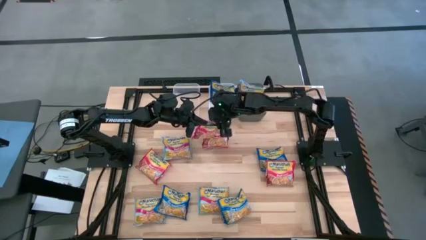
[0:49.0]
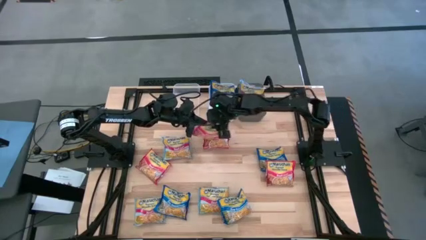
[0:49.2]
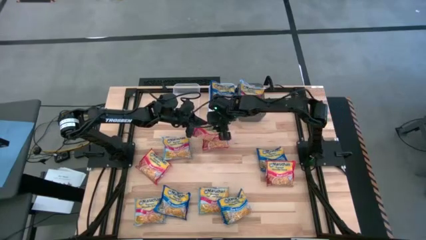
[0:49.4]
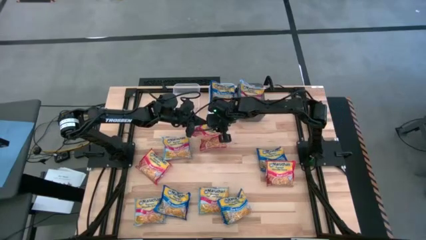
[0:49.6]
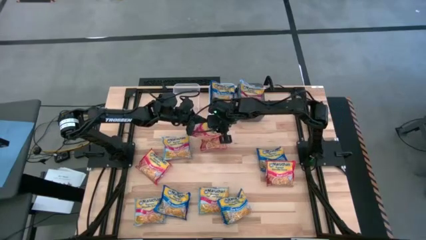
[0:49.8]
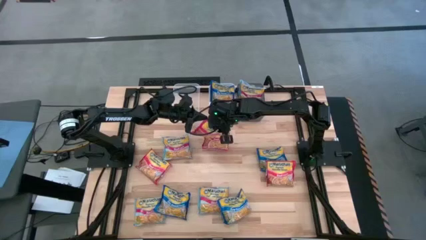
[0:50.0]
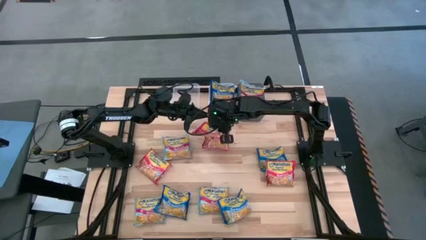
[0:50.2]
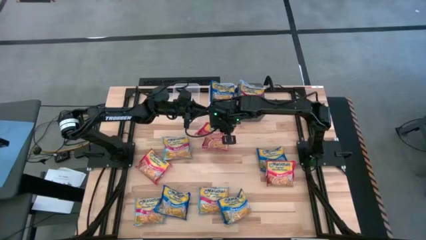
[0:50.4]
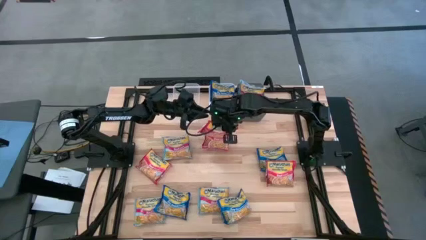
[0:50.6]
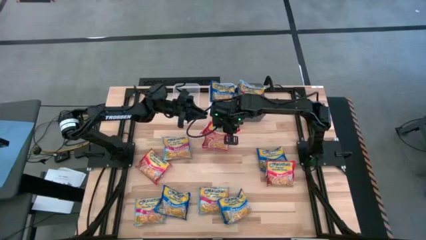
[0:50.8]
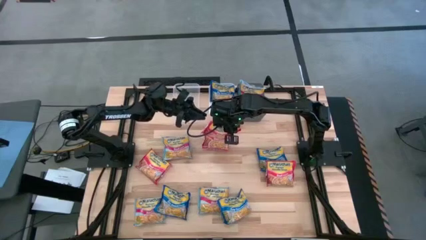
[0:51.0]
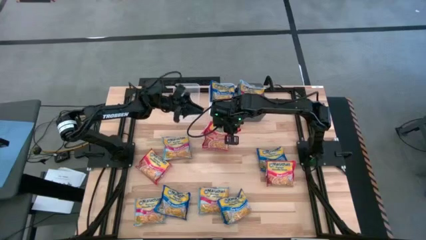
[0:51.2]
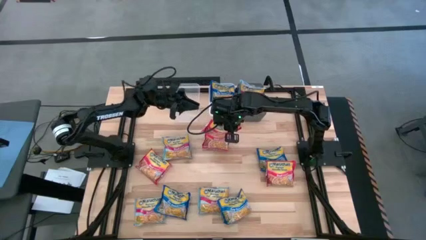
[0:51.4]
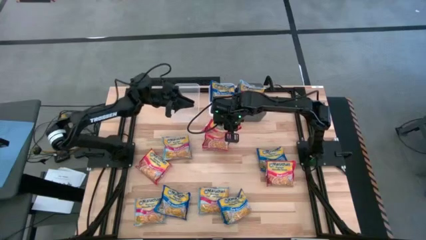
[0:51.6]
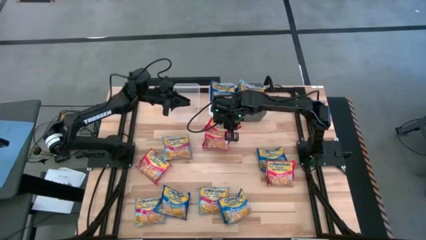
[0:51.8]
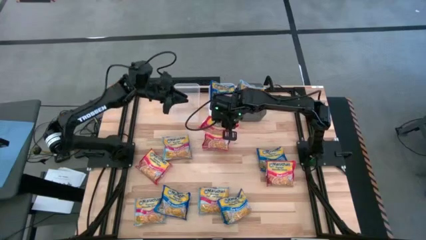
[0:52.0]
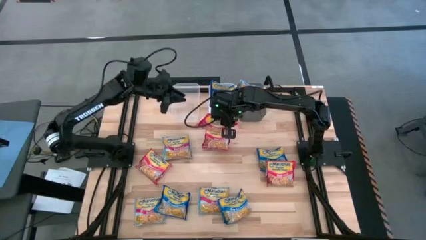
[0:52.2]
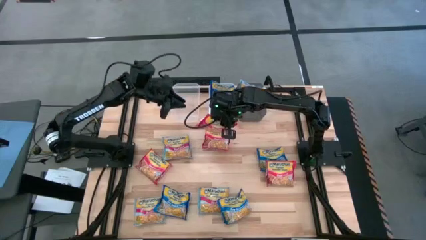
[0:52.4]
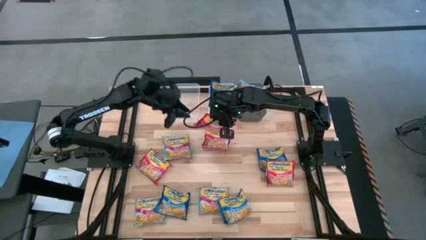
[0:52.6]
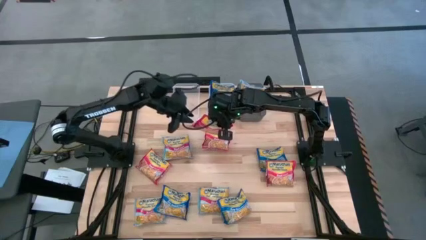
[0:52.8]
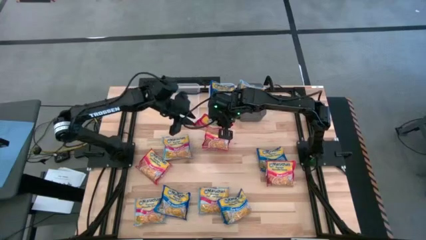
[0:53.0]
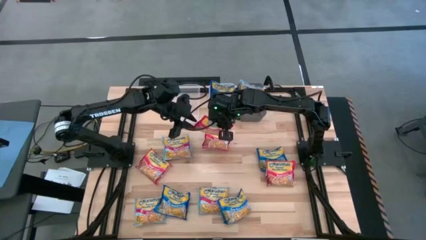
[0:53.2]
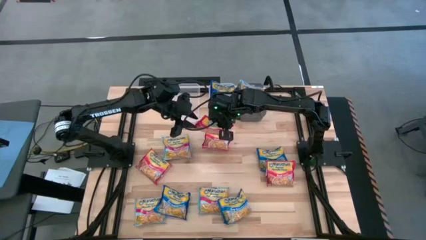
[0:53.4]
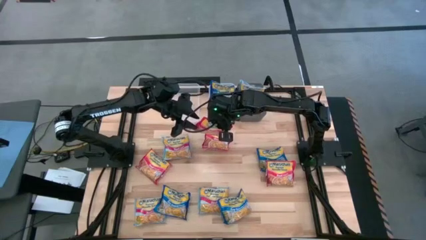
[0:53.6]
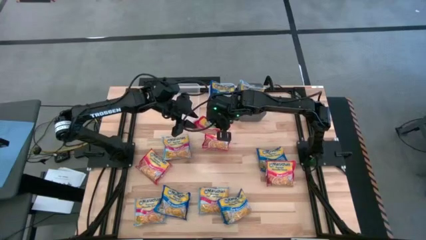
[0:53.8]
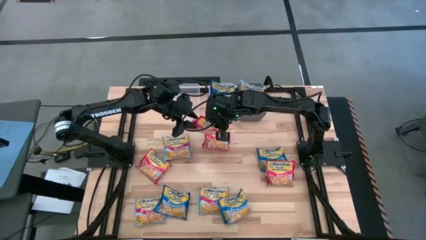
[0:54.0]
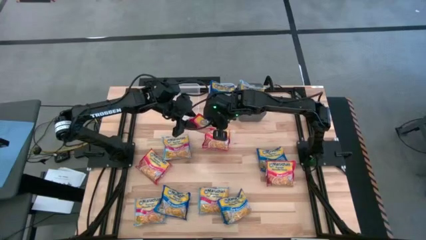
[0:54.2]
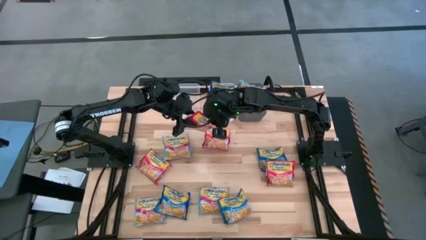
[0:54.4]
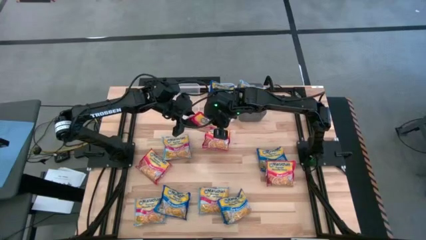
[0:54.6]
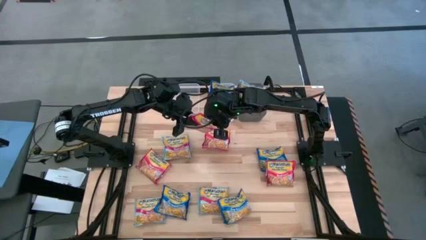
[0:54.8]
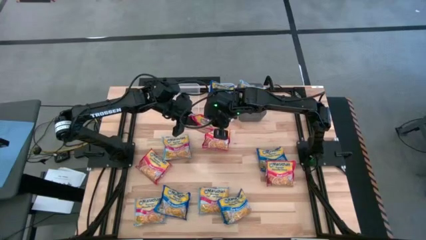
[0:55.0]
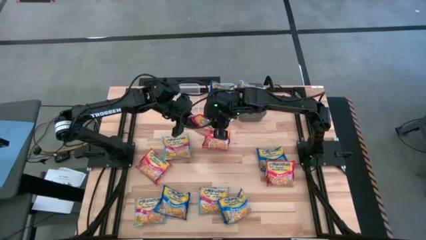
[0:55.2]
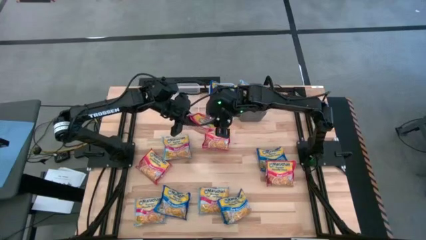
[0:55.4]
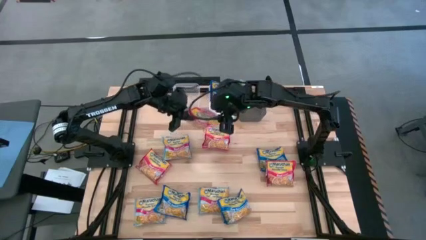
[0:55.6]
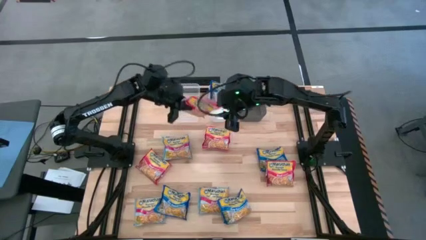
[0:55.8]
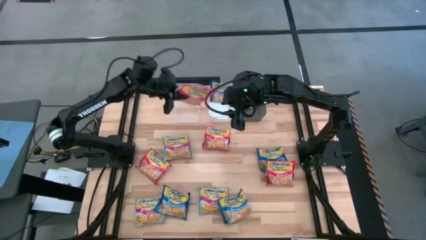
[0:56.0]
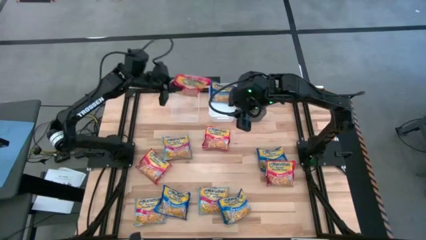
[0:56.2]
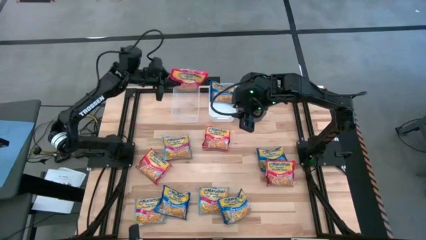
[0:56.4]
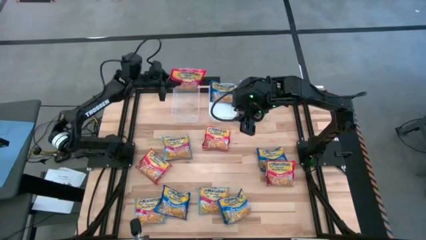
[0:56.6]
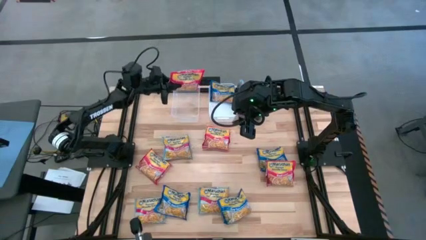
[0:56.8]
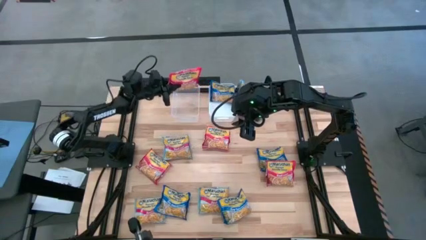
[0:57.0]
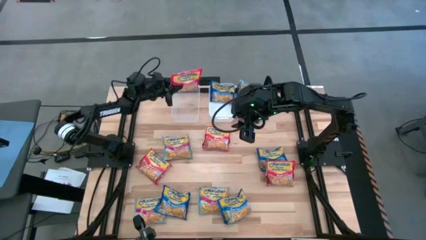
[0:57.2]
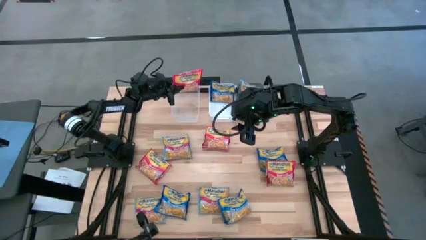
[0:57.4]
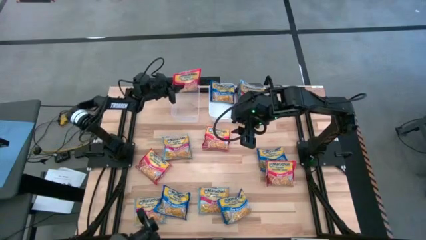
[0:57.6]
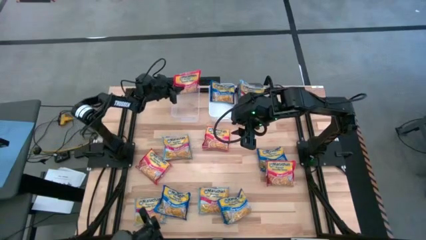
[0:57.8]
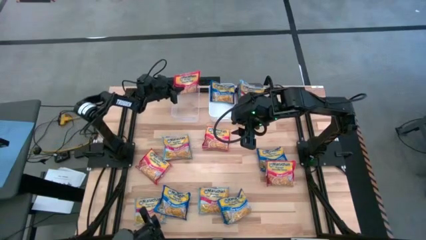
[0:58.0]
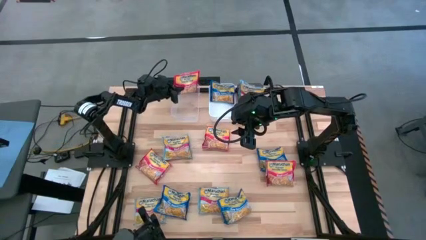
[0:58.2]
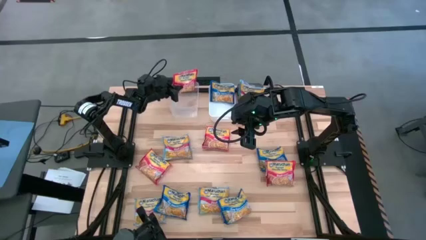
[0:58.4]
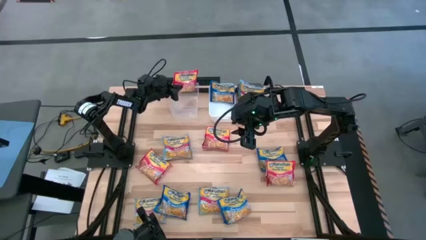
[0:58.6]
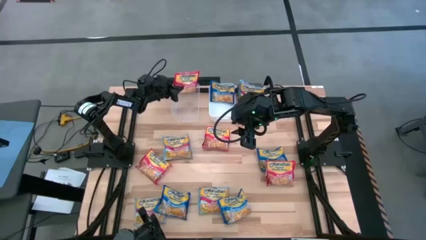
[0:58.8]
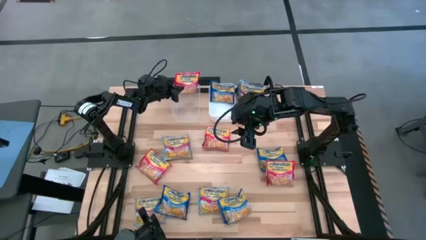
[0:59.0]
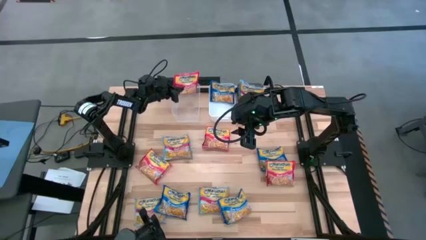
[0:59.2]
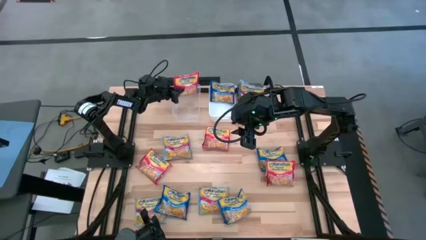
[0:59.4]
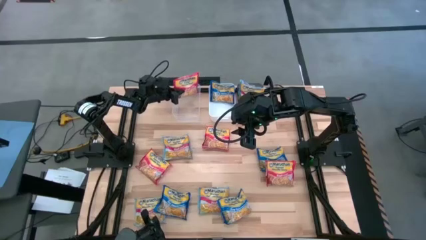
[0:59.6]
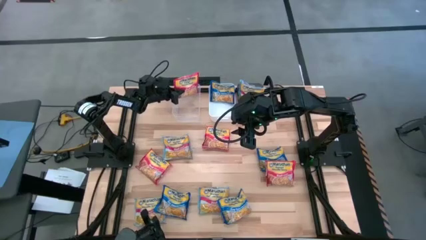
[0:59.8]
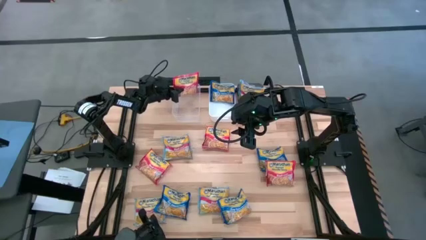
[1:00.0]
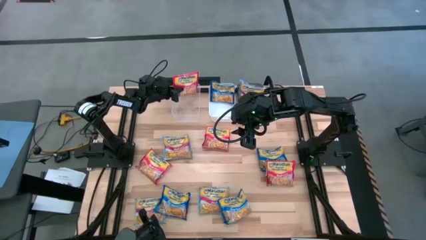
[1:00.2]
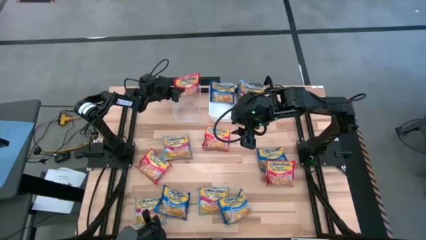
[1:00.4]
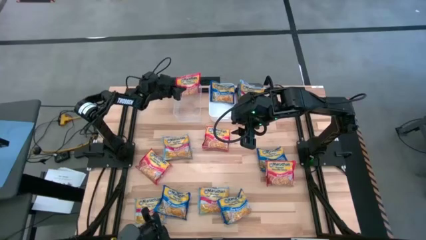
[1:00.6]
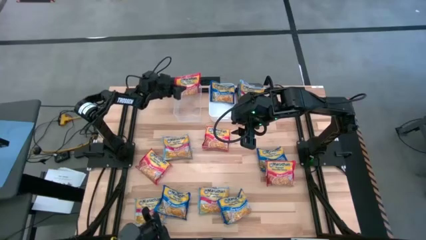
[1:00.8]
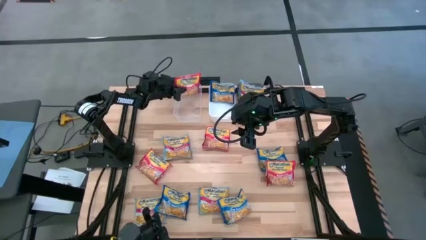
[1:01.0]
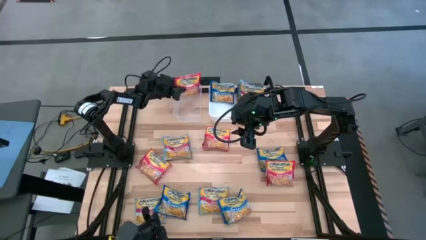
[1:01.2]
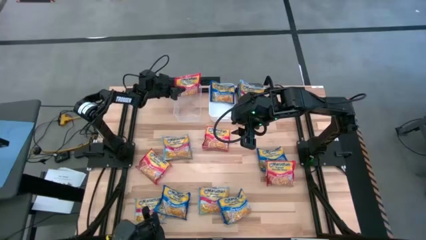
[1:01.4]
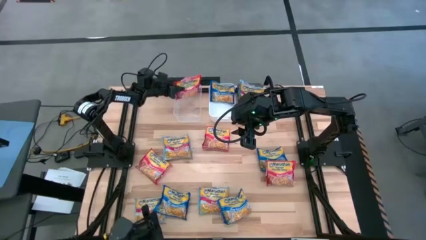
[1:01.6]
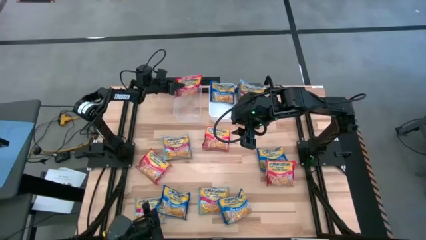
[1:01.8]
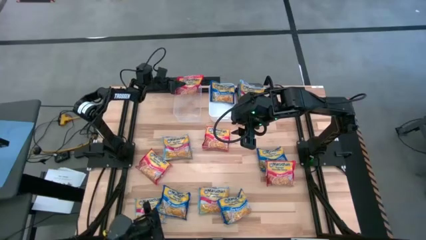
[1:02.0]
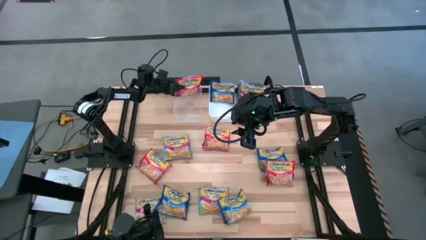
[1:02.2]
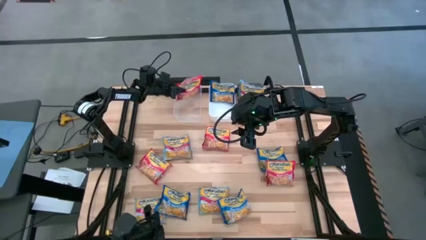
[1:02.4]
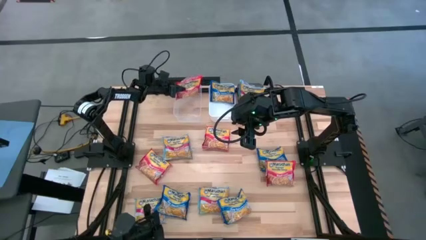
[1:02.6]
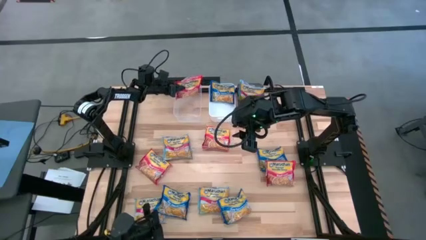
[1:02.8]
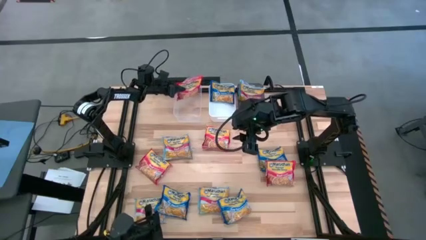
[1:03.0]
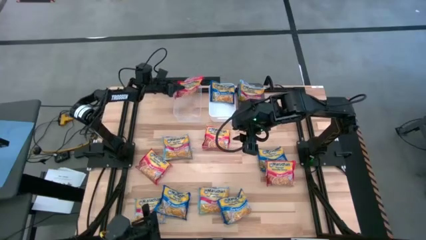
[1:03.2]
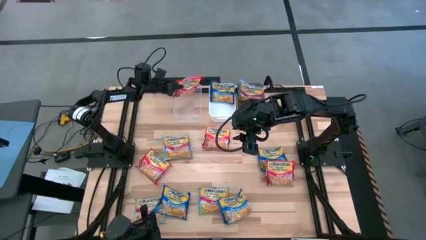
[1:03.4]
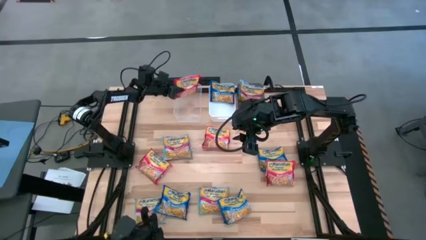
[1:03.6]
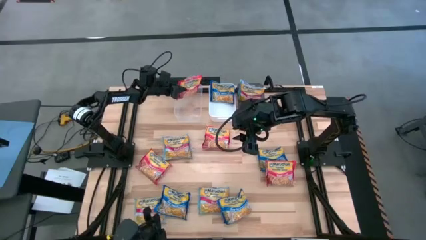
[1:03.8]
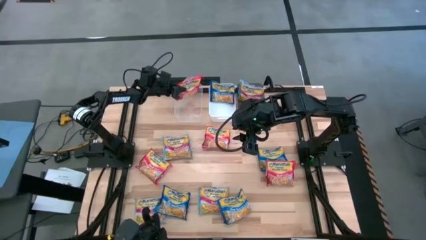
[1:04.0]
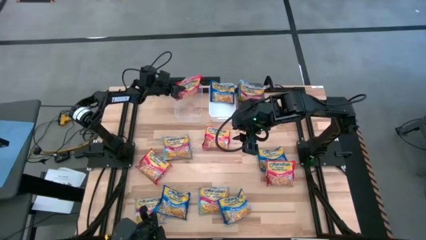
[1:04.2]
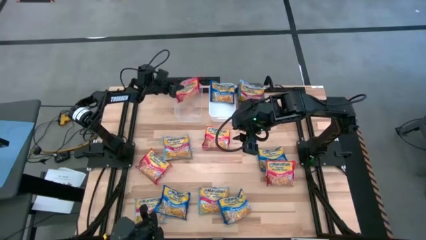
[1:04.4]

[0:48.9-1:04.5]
Task: Sort Maruchan noodles
Put the red noodle pack into the transparent bin

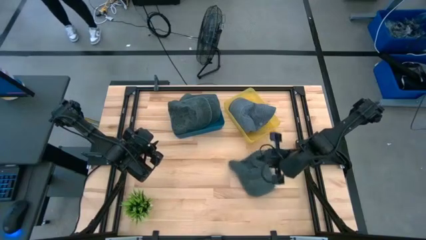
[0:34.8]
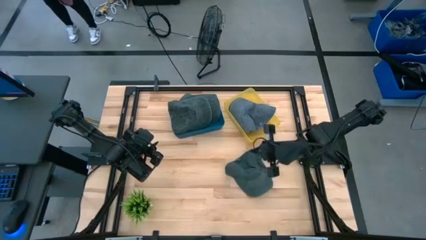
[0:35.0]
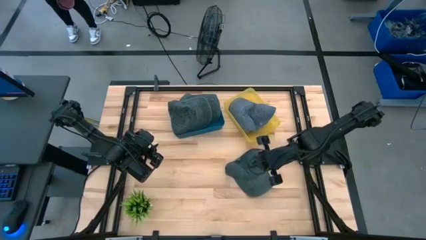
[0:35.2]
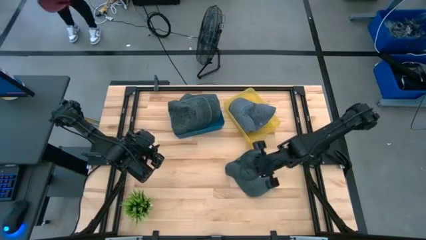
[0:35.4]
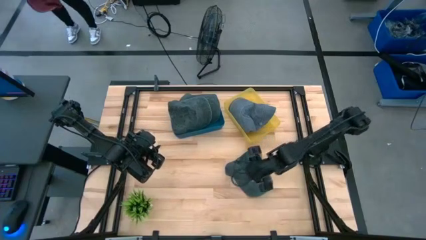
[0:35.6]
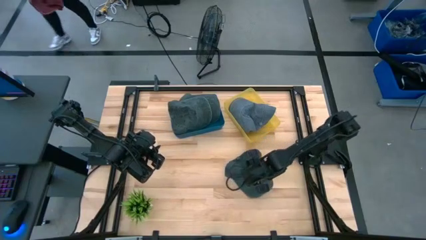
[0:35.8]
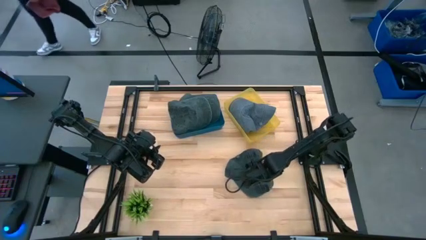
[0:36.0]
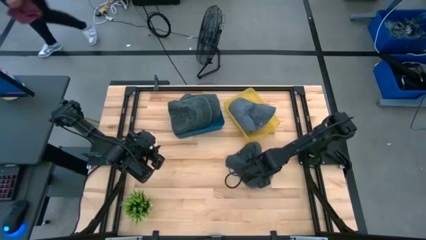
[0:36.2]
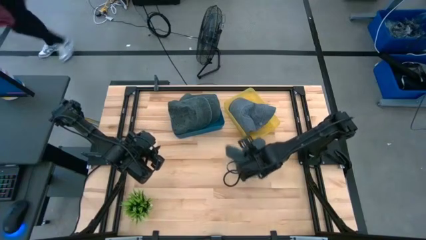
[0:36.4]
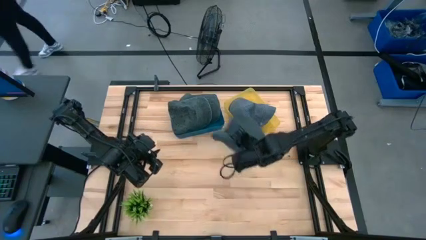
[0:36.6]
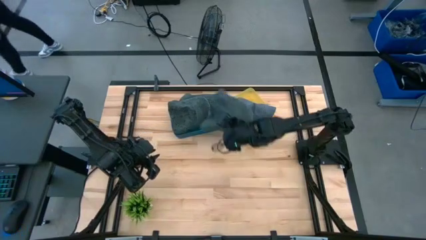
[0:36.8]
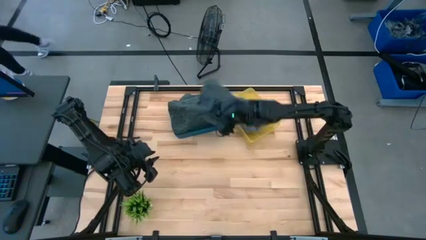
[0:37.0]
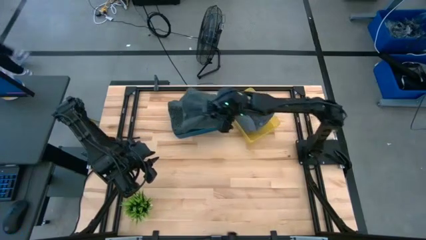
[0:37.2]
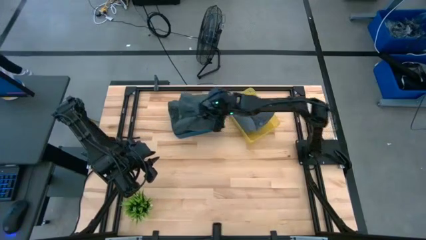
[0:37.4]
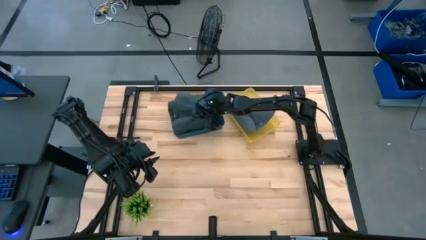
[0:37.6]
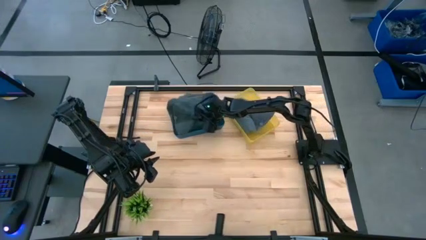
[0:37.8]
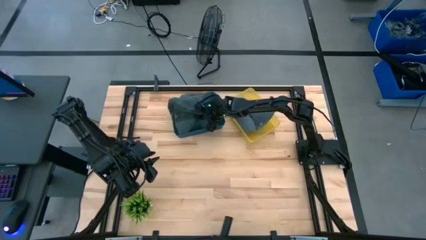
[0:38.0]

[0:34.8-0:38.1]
Task: Pick & Place hat
Put the green cap into the blue bin
